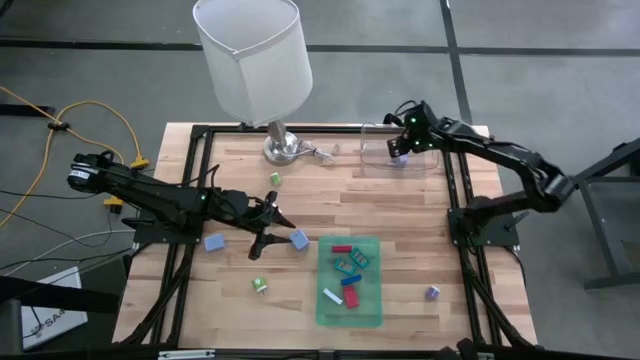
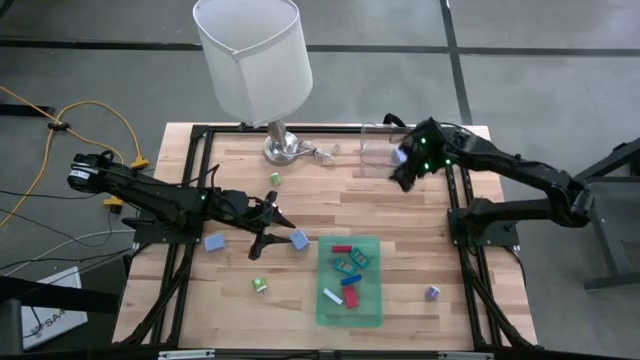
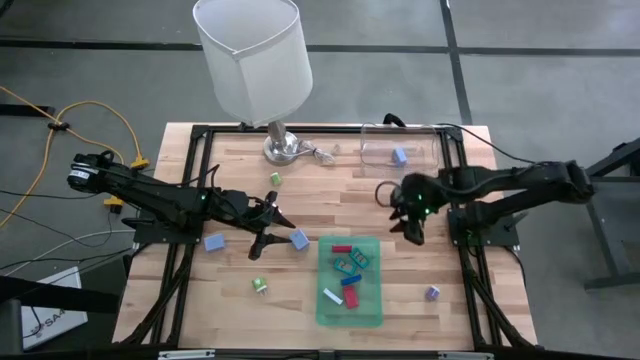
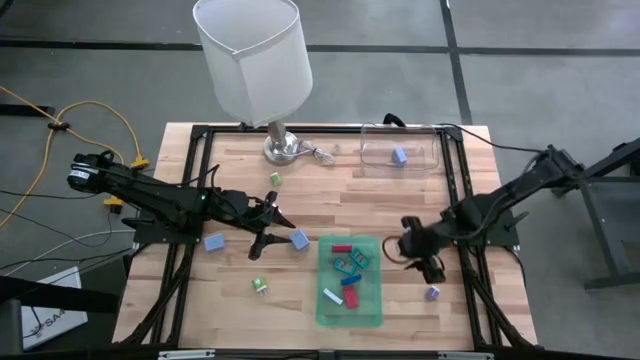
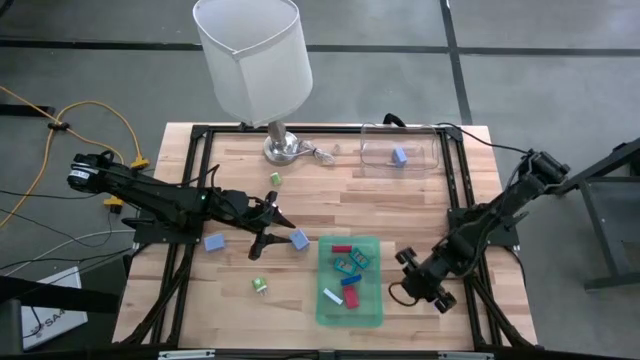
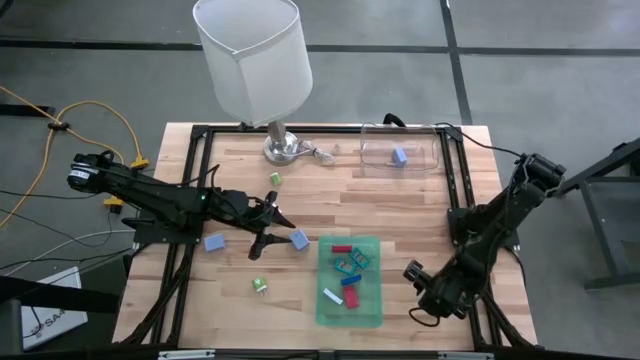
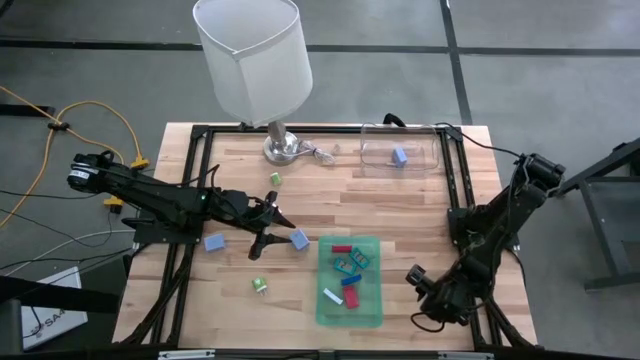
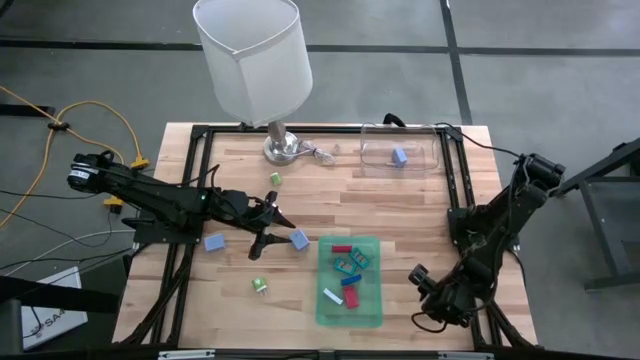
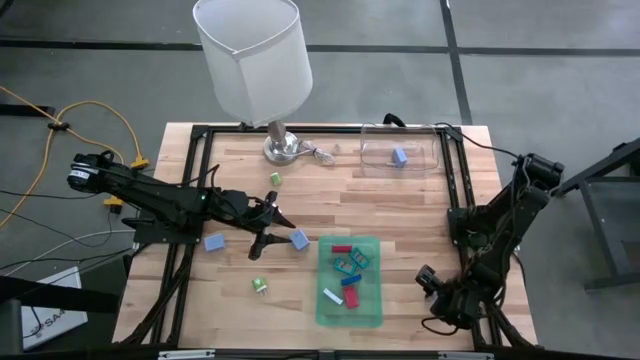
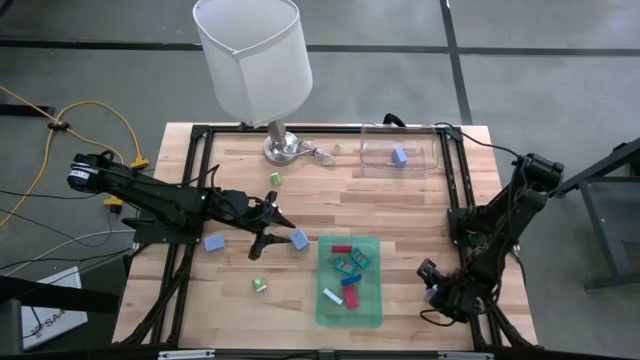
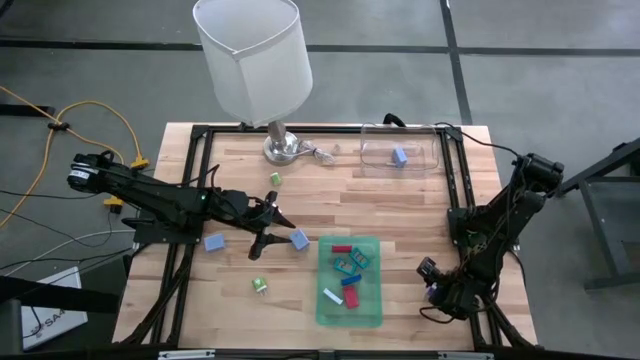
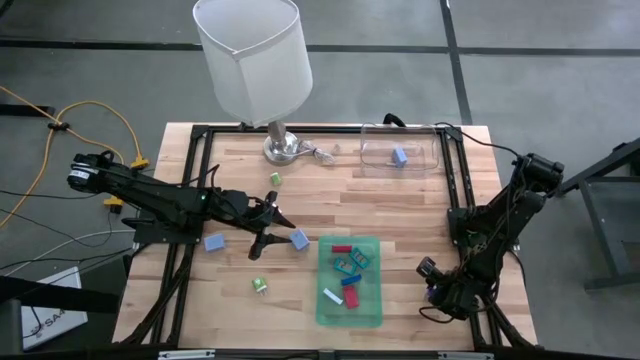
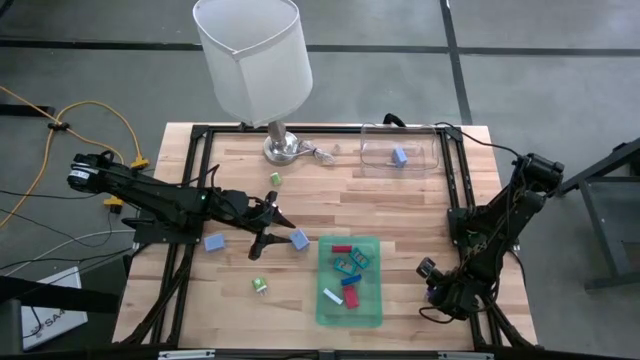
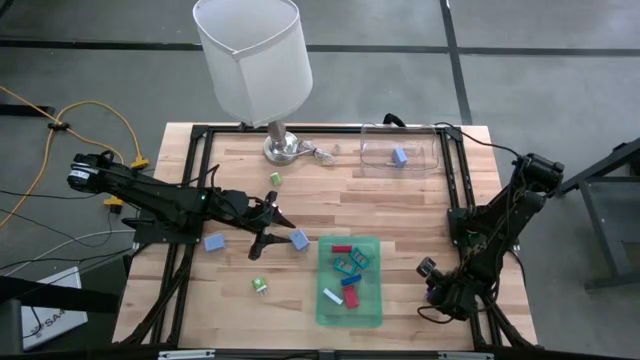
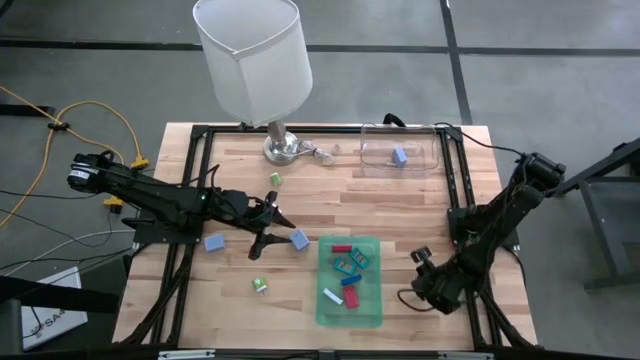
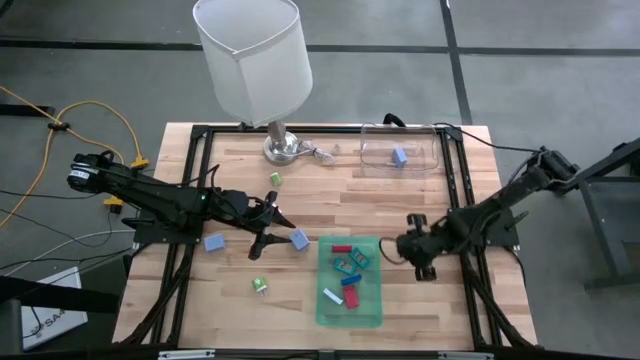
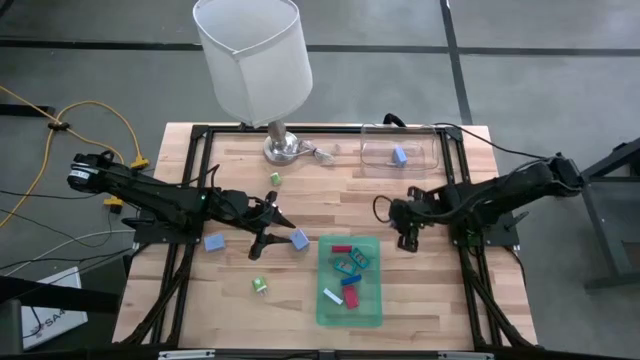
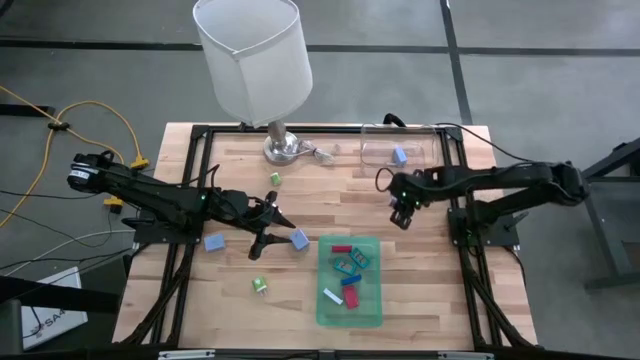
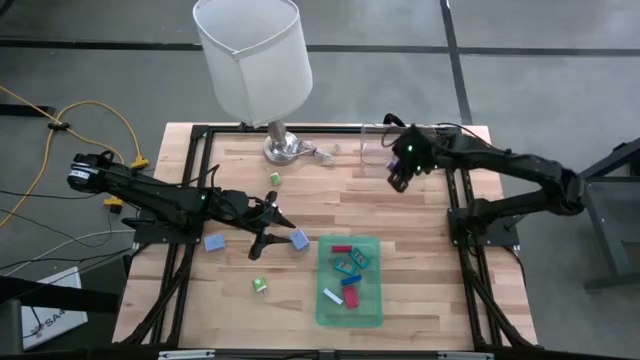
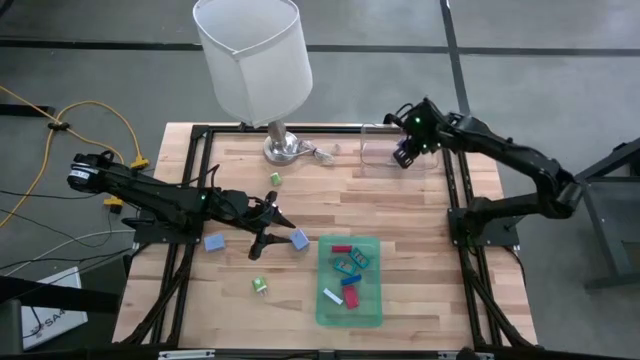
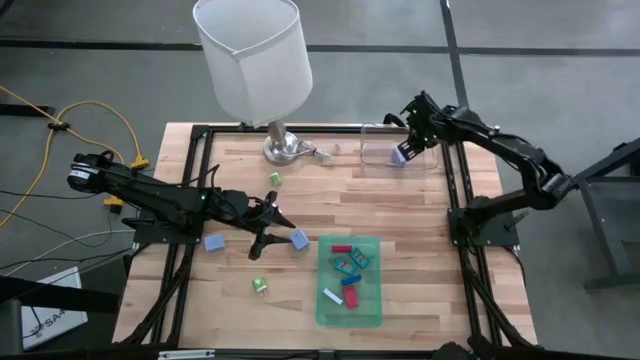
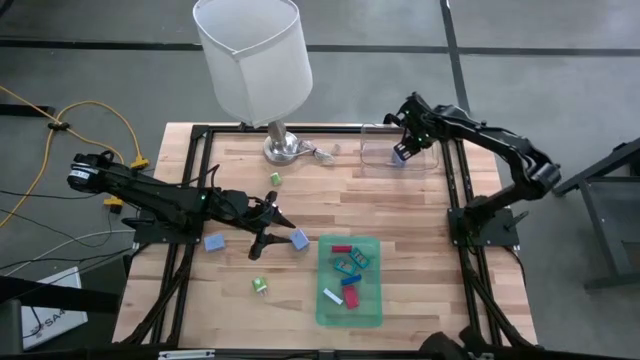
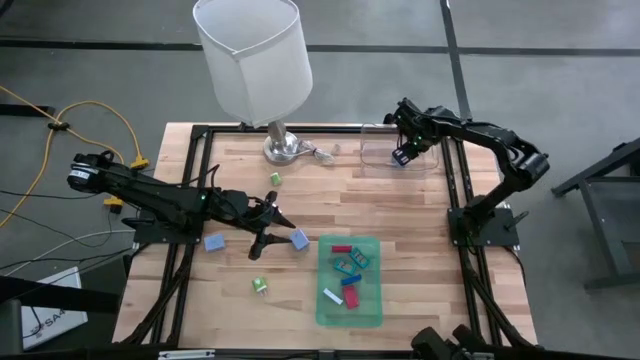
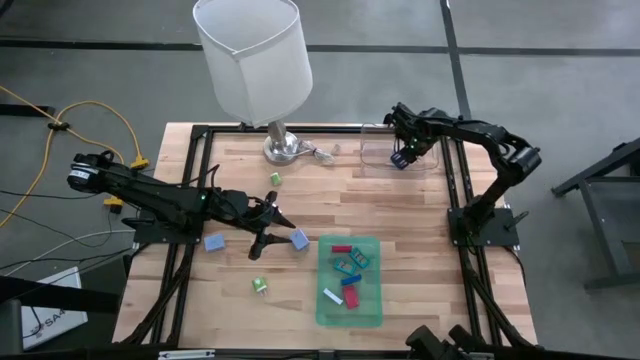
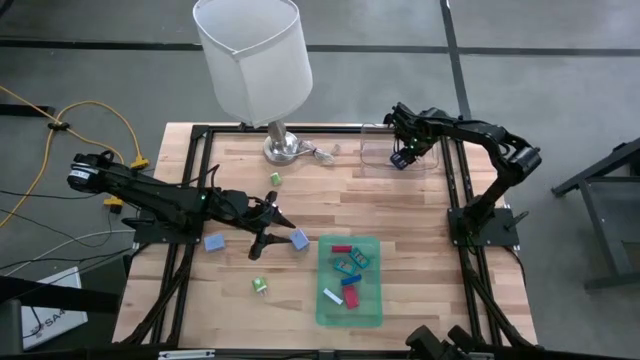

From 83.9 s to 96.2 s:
Task: Pick & Place Office items
Put the violet charger adapter into the transparent bin

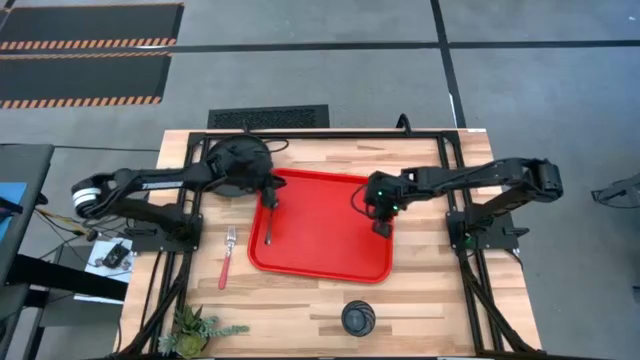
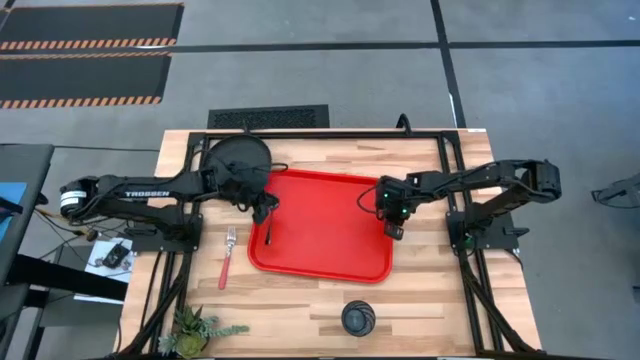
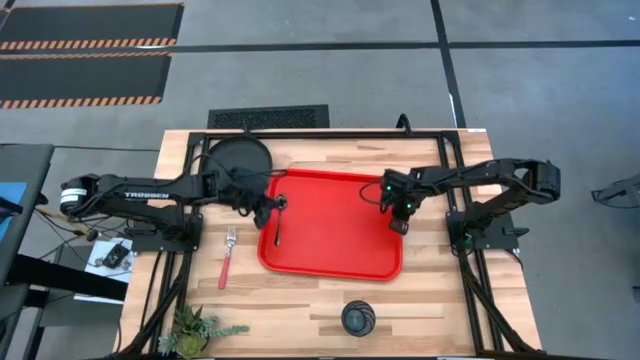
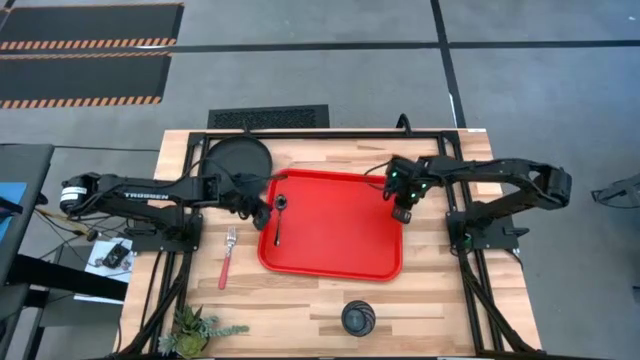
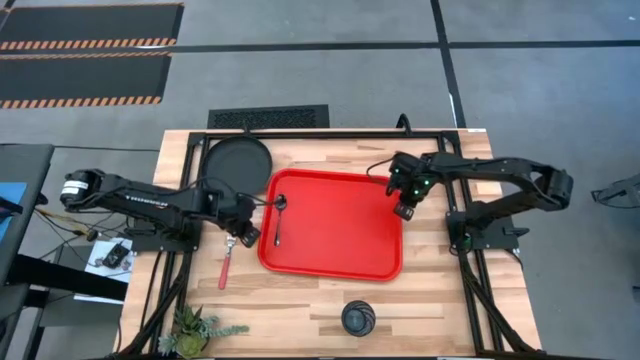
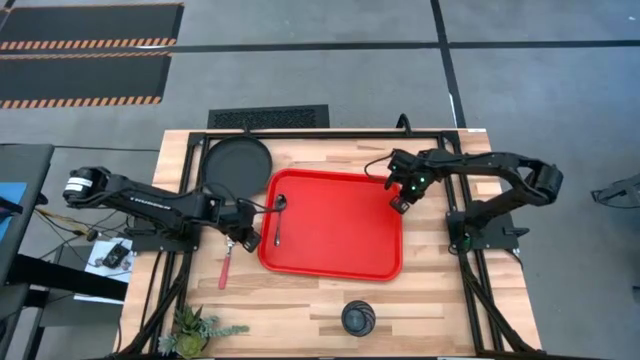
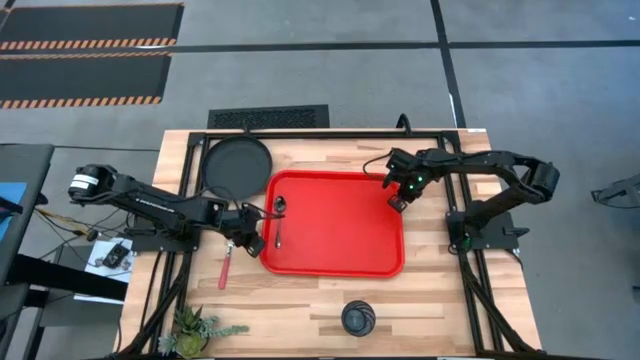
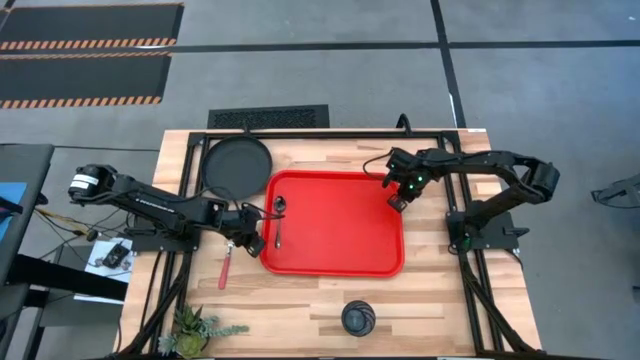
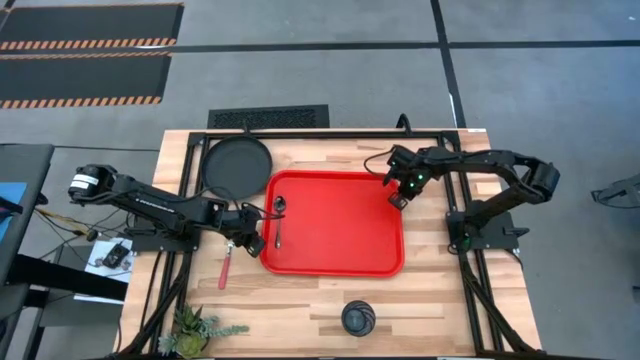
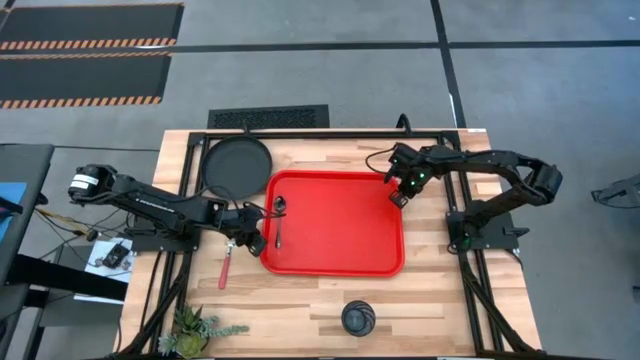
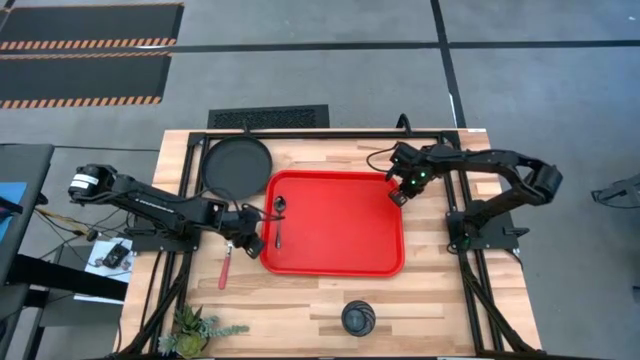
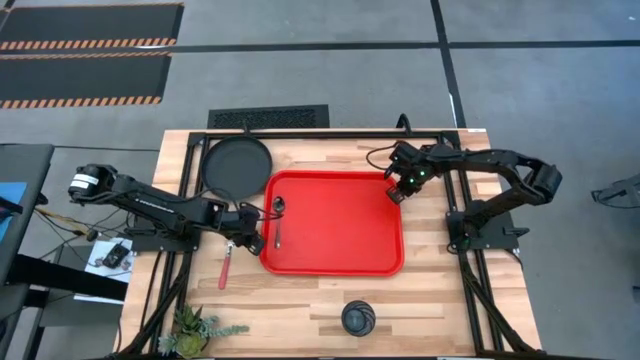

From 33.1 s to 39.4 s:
Task: Pick and place plate/cup/fork/spoon on tray
Adjust the orange tray on the table
